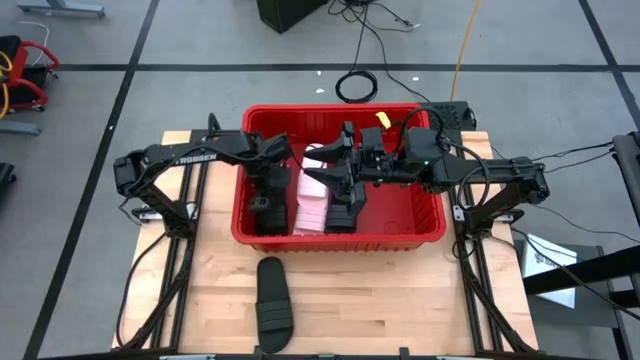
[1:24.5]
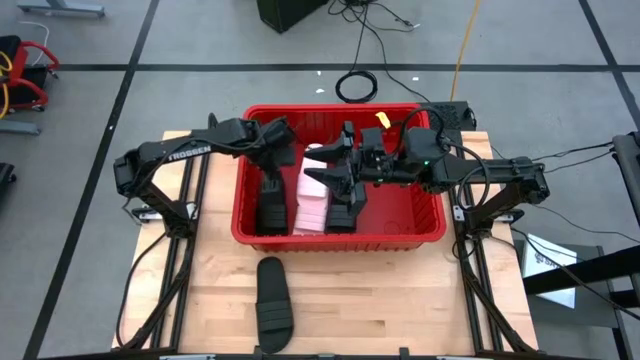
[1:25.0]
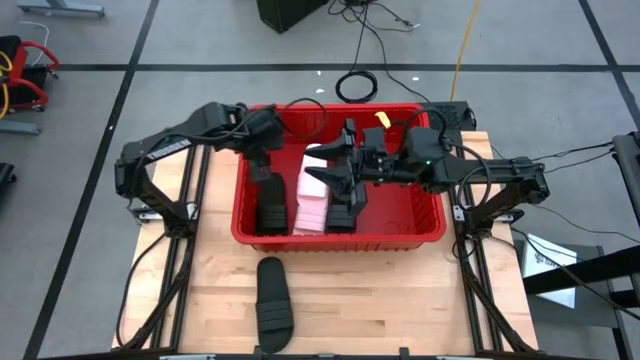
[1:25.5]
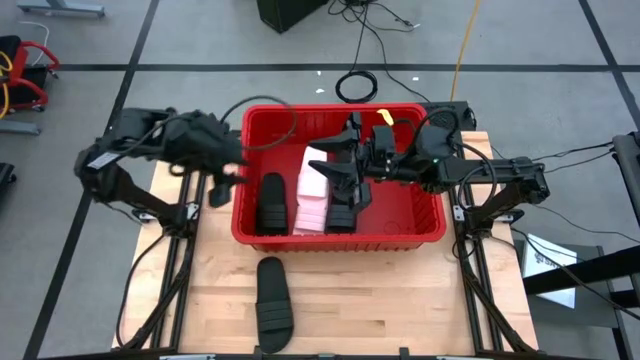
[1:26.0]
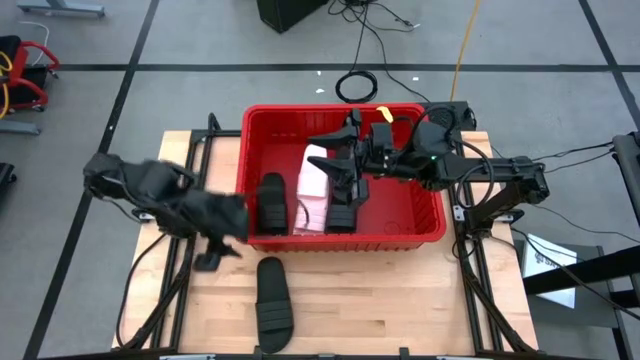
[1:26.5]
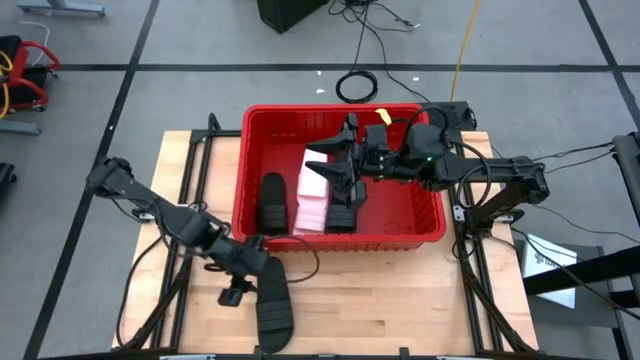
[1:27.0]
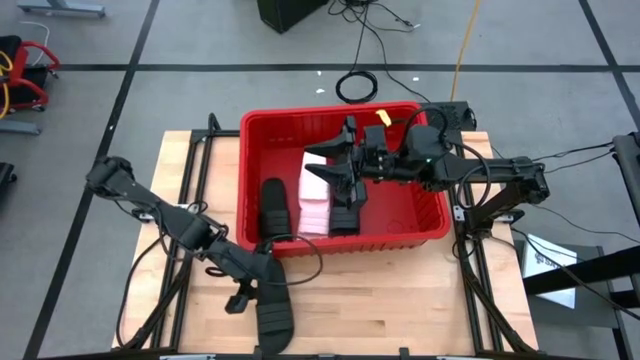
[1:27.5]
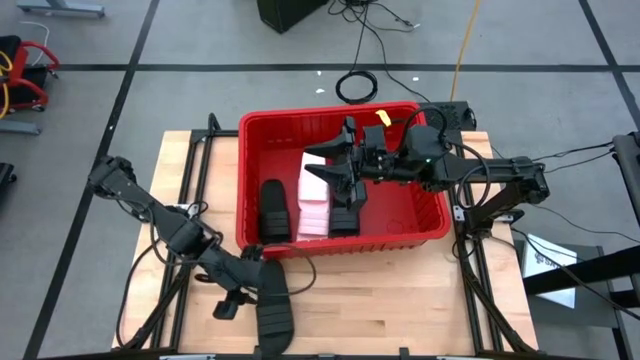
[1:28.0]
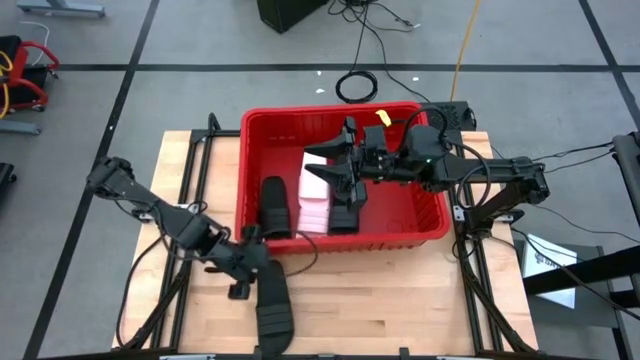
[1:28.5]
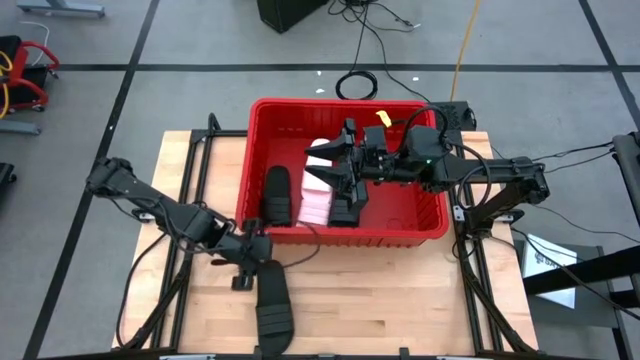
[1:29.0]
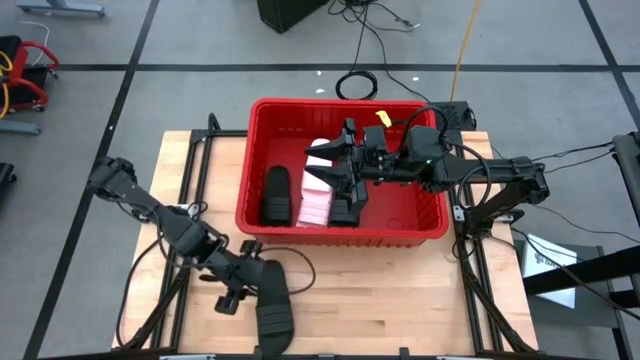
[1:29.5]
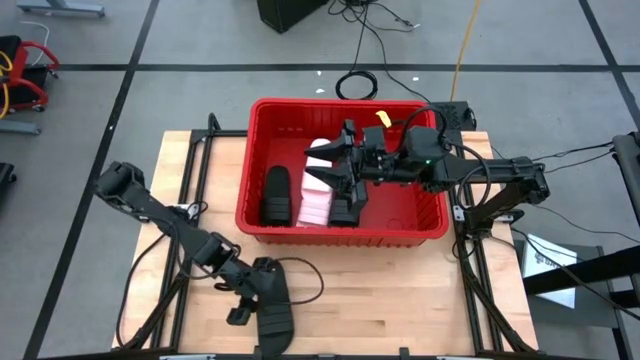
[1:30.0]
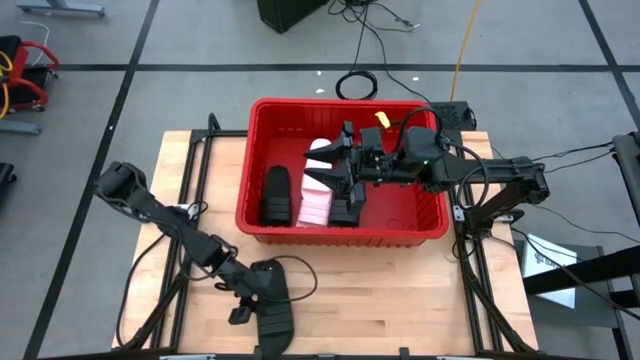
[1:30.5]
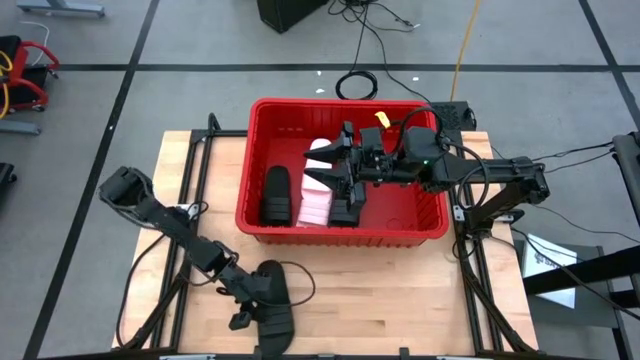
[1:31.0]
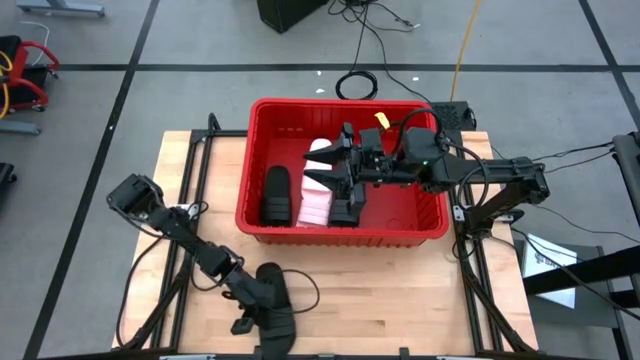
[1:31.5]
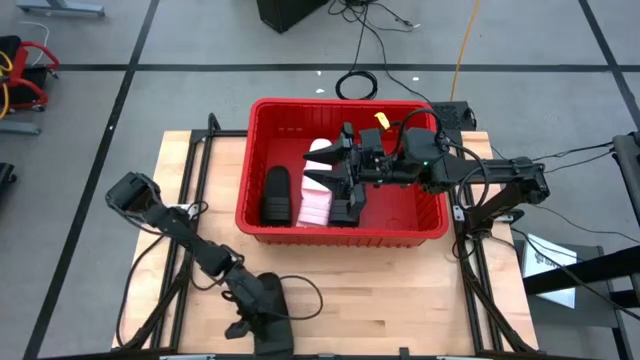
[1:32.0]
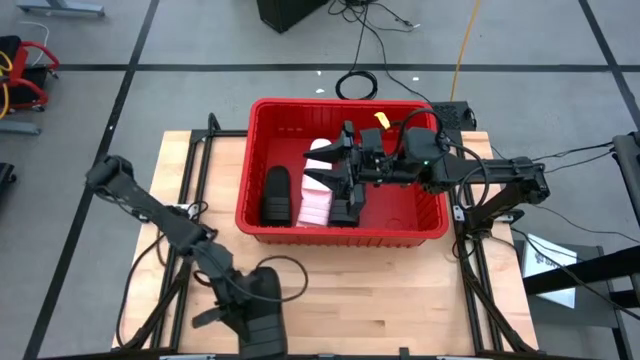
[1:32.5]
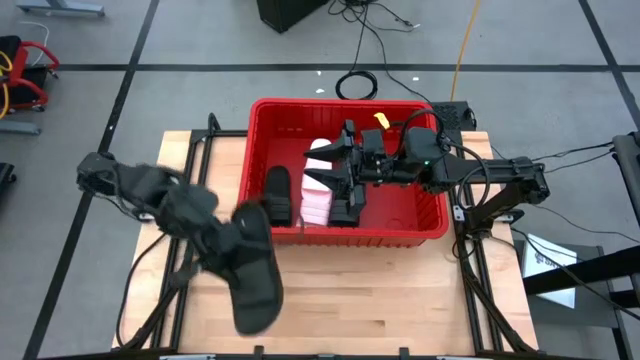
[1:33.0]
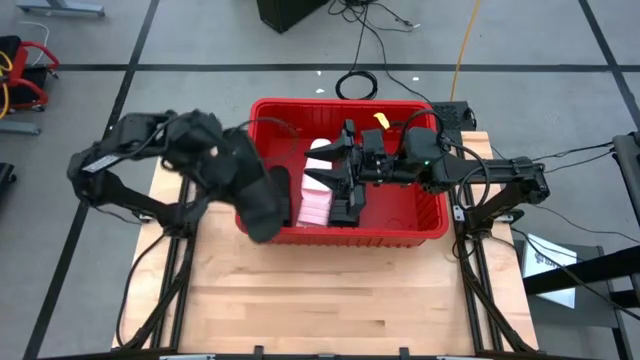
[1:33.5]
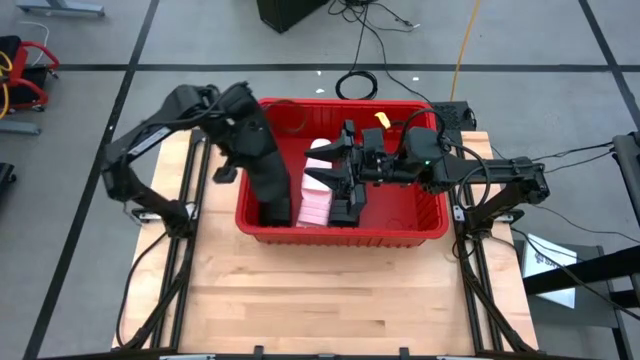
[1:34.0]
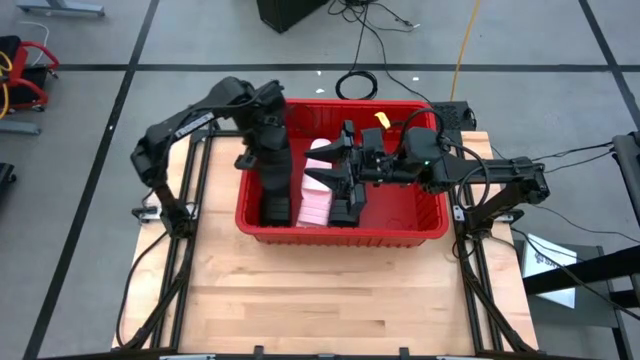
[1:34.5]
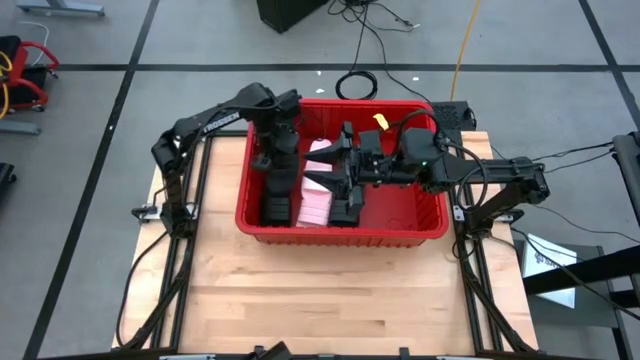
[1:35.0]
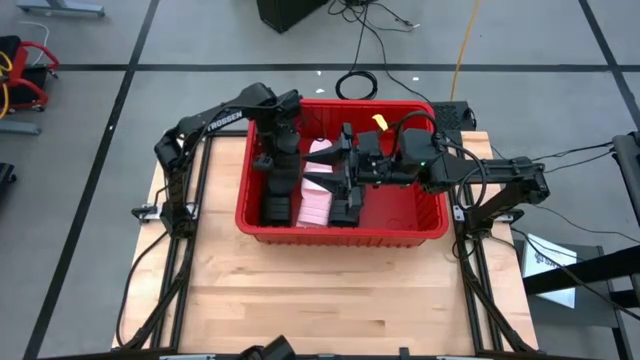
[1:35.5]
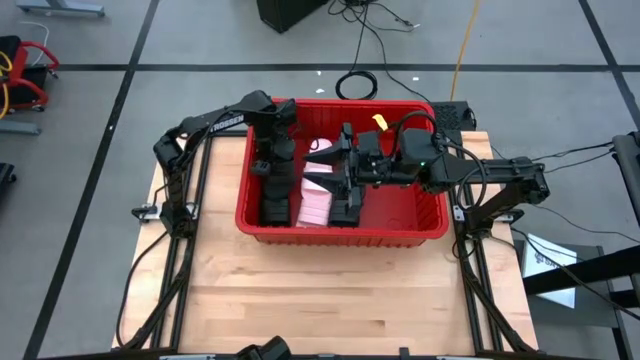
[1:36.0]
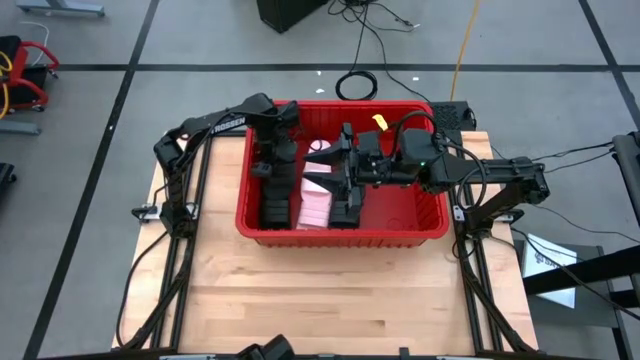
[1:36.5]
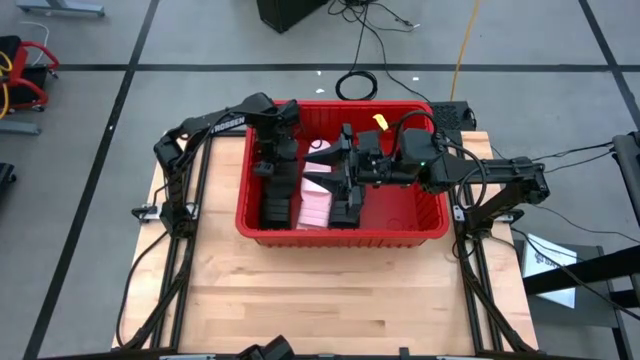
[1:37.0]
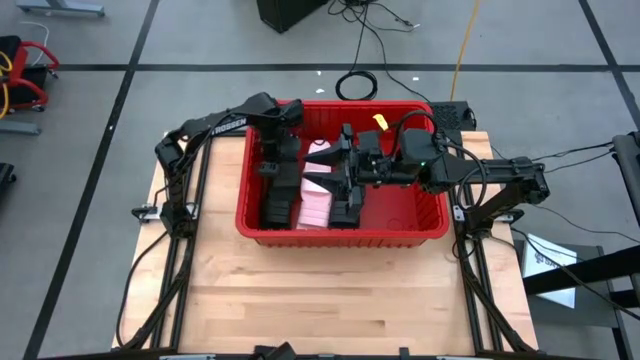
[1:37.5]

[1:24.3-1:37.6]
Task: Pick and place slides into bin
Put the black slipper into the red bin
